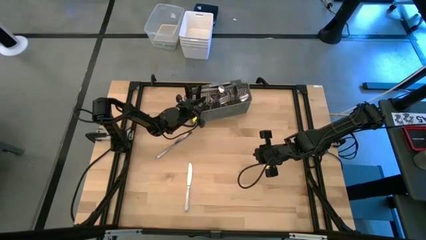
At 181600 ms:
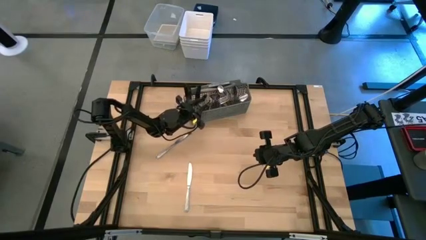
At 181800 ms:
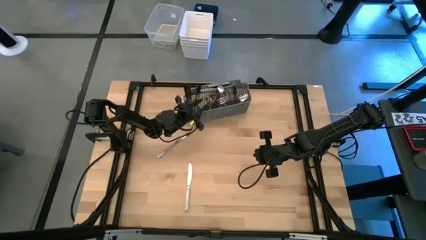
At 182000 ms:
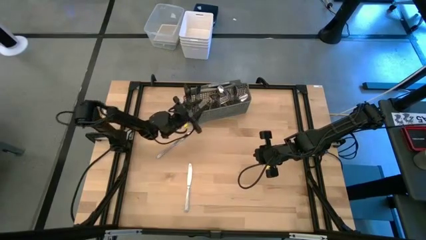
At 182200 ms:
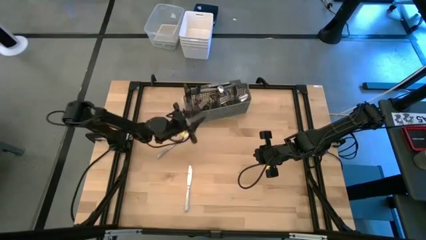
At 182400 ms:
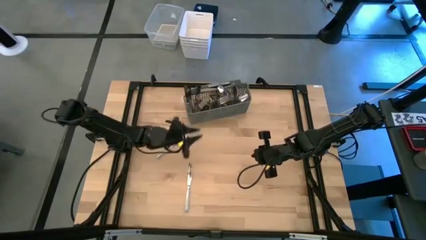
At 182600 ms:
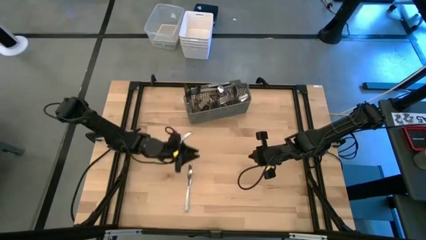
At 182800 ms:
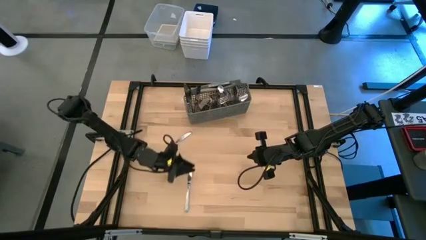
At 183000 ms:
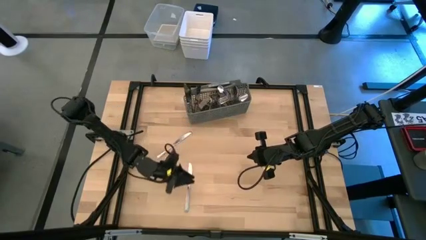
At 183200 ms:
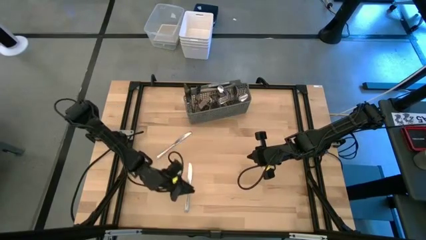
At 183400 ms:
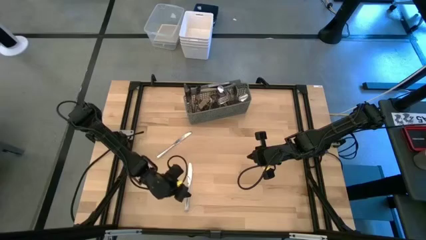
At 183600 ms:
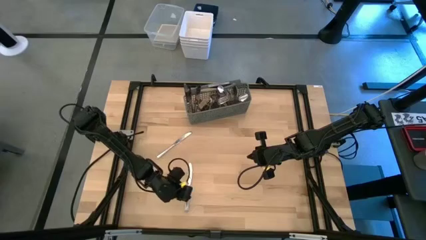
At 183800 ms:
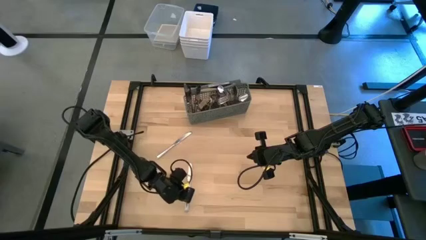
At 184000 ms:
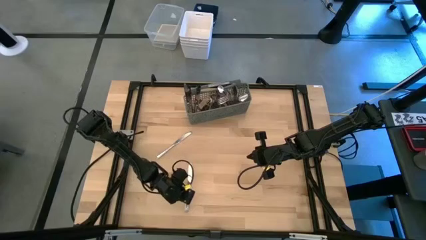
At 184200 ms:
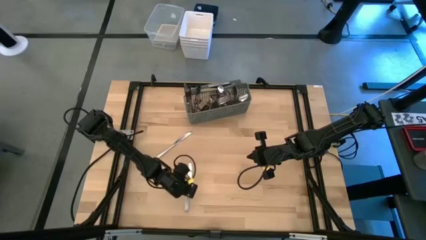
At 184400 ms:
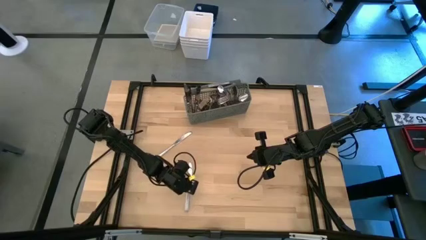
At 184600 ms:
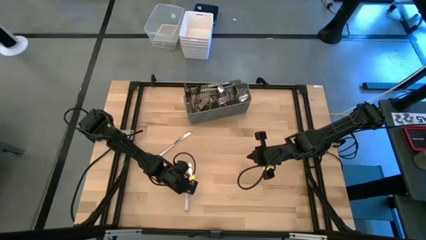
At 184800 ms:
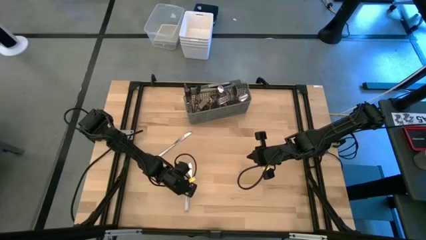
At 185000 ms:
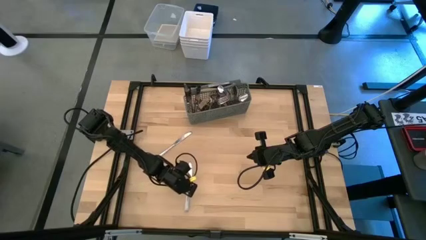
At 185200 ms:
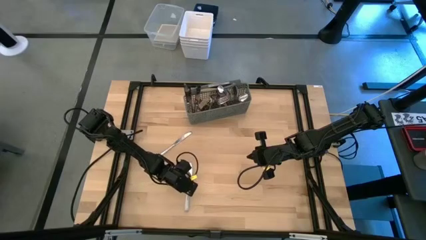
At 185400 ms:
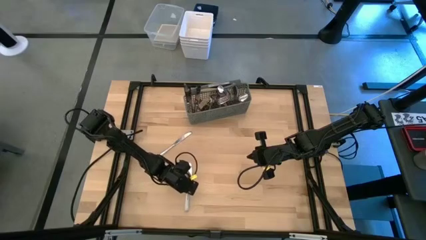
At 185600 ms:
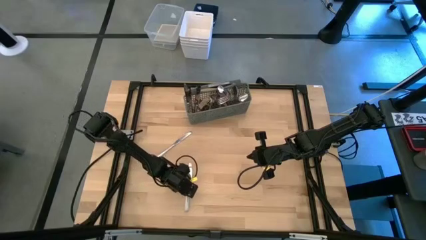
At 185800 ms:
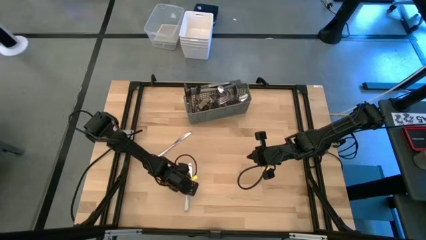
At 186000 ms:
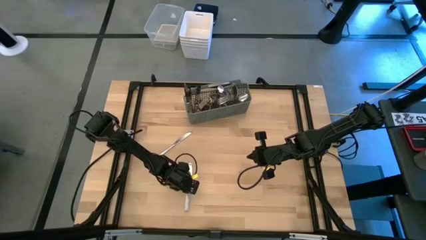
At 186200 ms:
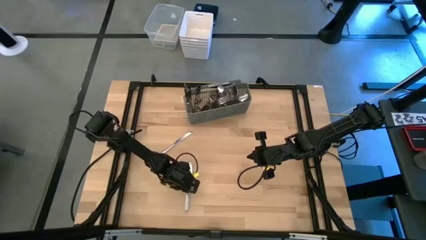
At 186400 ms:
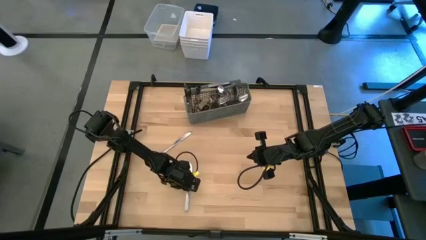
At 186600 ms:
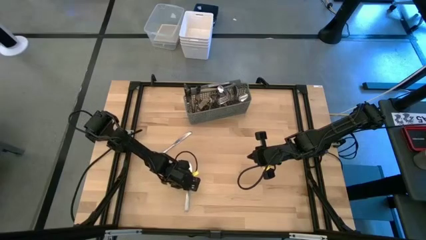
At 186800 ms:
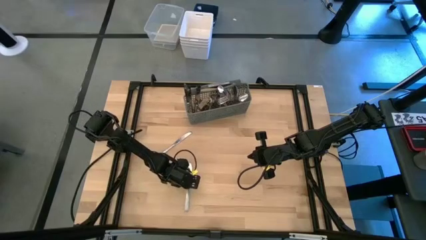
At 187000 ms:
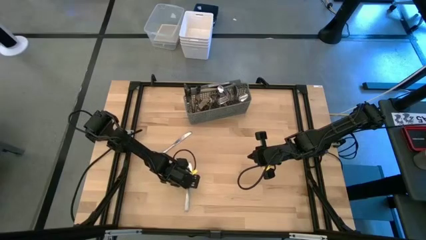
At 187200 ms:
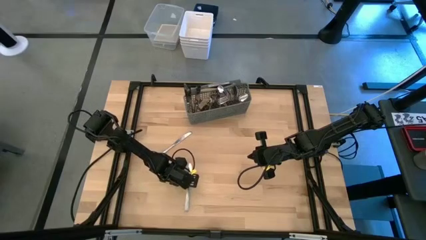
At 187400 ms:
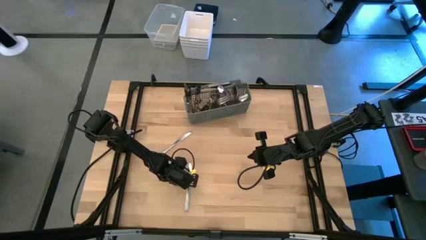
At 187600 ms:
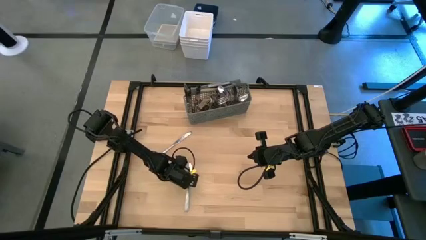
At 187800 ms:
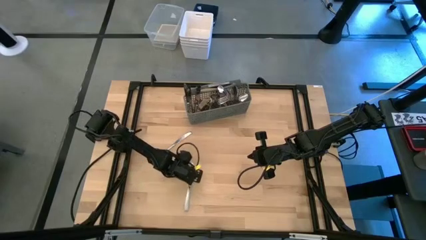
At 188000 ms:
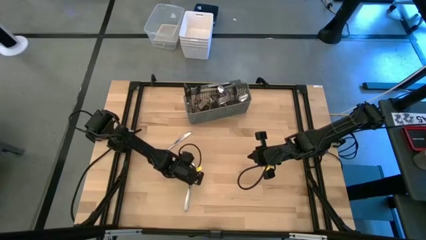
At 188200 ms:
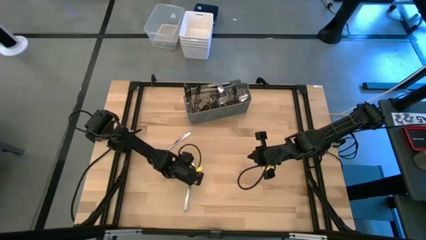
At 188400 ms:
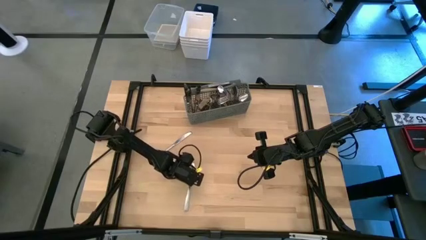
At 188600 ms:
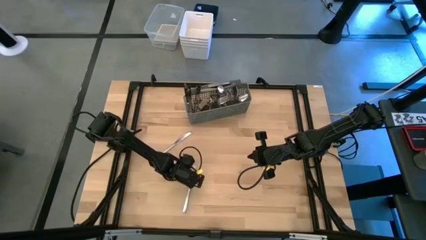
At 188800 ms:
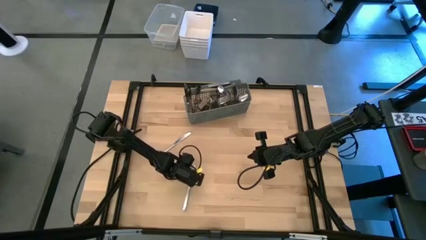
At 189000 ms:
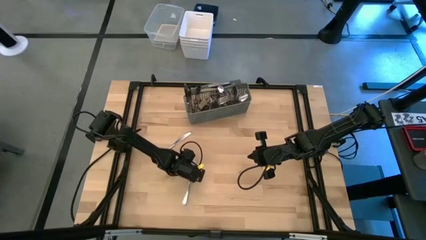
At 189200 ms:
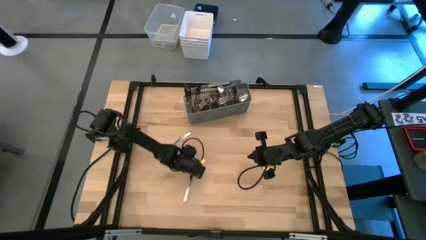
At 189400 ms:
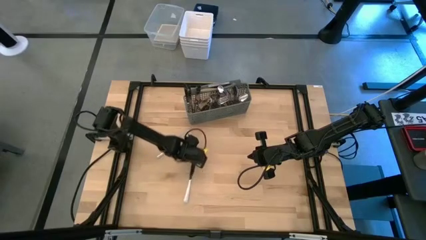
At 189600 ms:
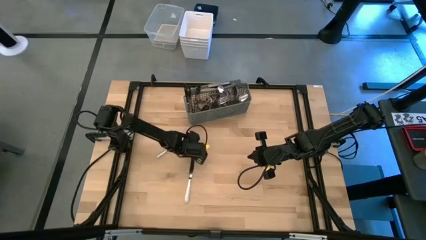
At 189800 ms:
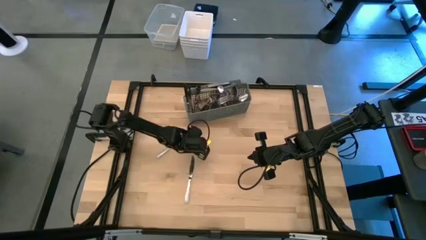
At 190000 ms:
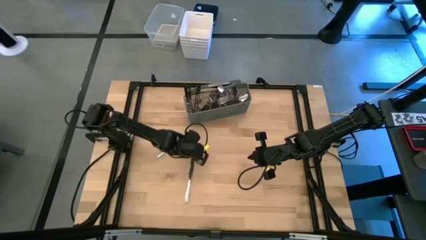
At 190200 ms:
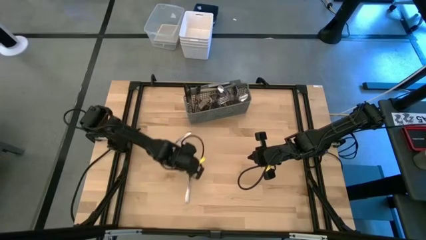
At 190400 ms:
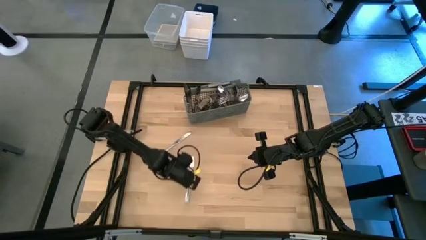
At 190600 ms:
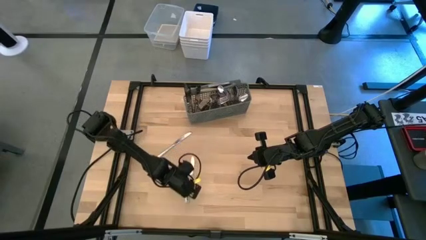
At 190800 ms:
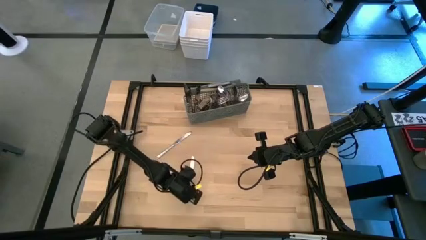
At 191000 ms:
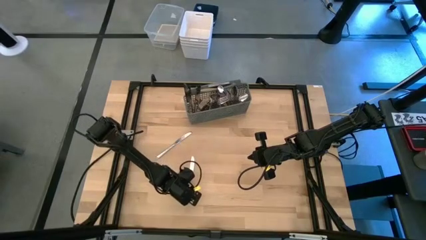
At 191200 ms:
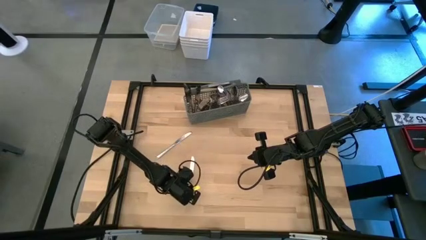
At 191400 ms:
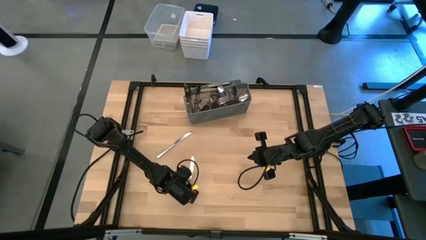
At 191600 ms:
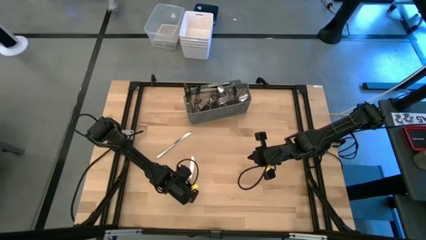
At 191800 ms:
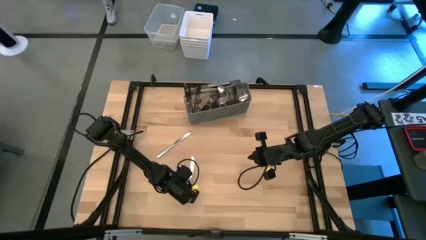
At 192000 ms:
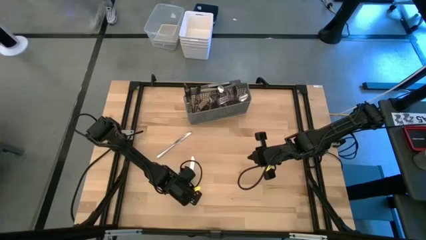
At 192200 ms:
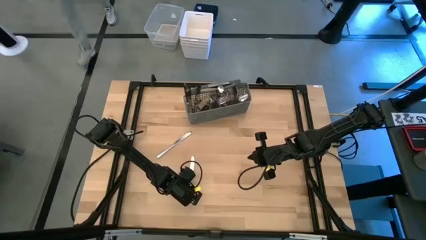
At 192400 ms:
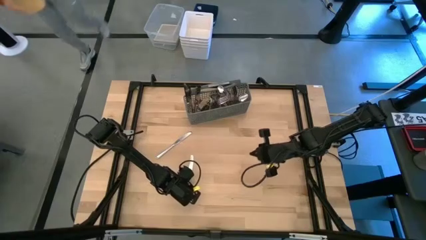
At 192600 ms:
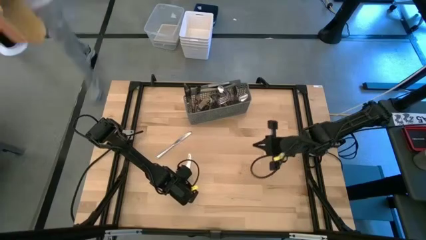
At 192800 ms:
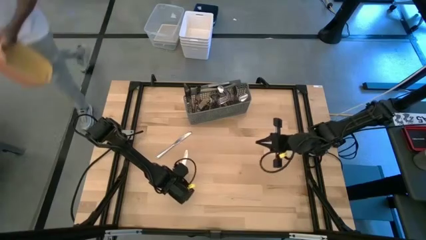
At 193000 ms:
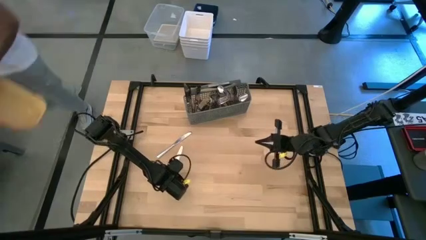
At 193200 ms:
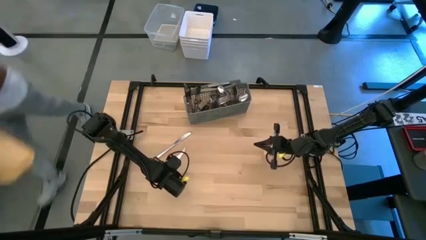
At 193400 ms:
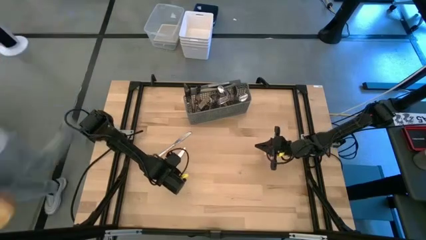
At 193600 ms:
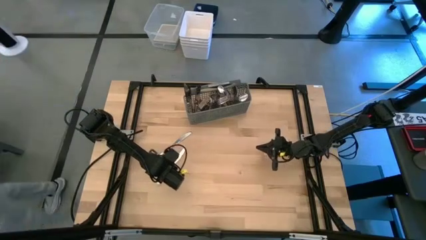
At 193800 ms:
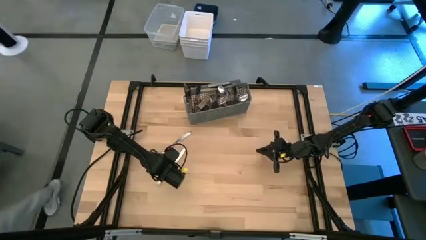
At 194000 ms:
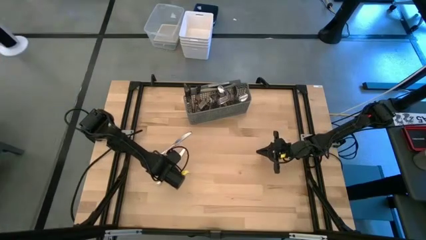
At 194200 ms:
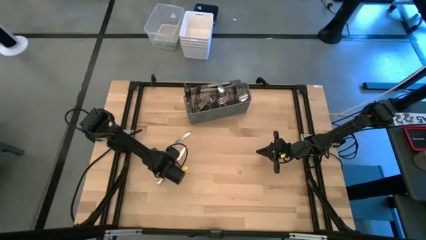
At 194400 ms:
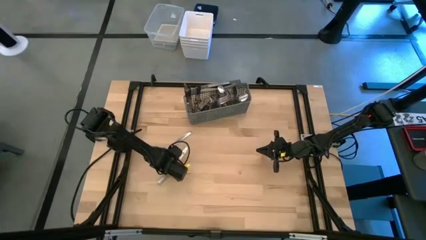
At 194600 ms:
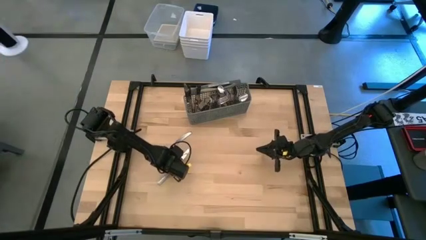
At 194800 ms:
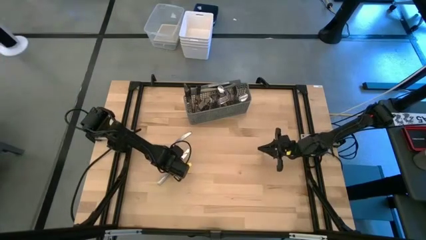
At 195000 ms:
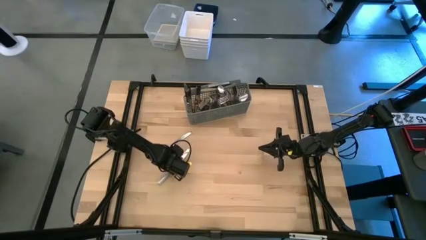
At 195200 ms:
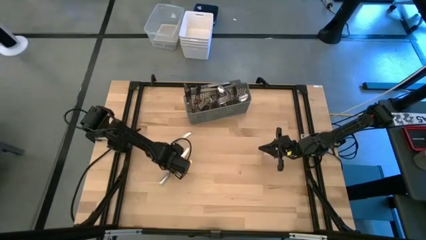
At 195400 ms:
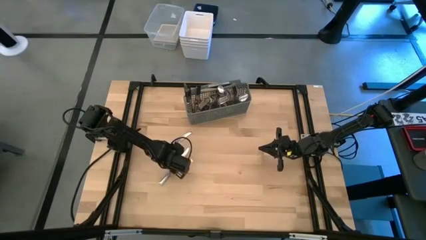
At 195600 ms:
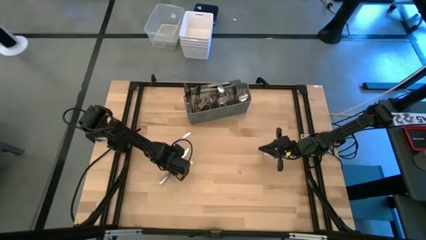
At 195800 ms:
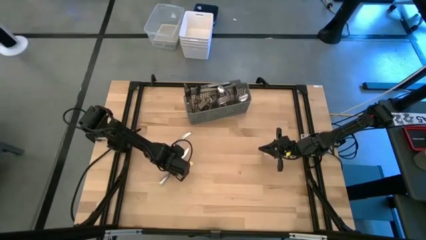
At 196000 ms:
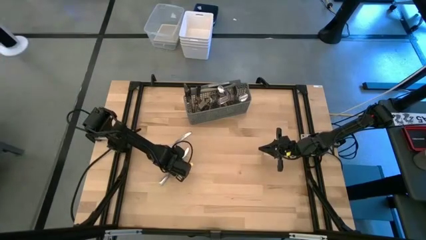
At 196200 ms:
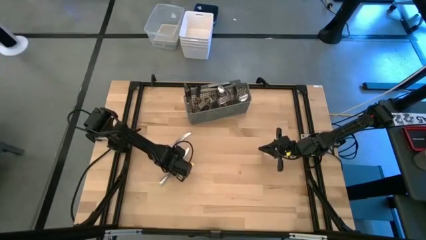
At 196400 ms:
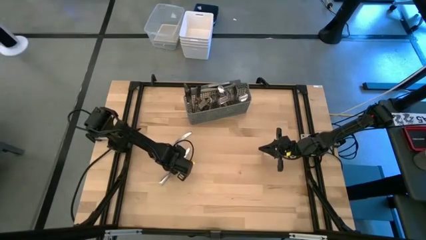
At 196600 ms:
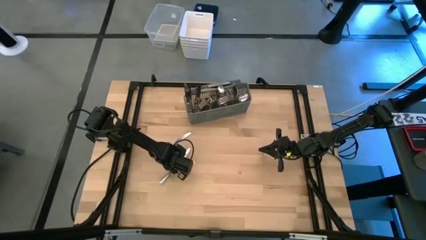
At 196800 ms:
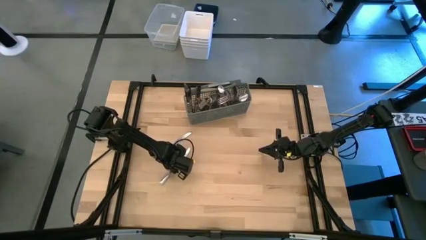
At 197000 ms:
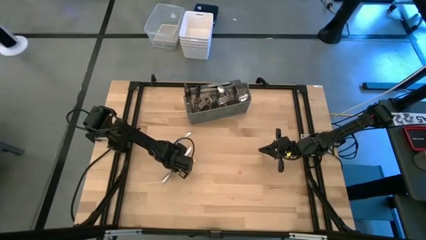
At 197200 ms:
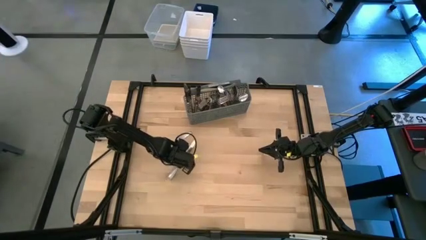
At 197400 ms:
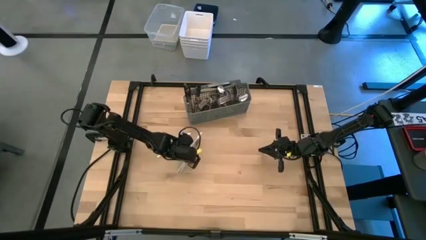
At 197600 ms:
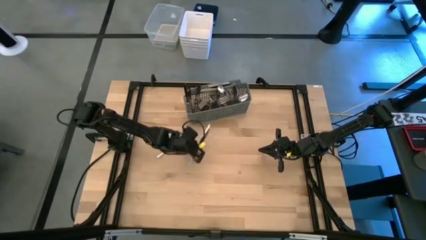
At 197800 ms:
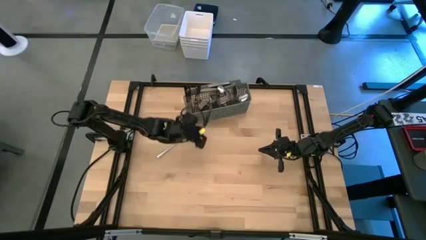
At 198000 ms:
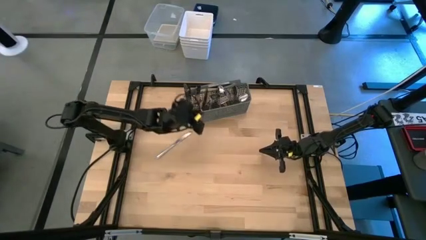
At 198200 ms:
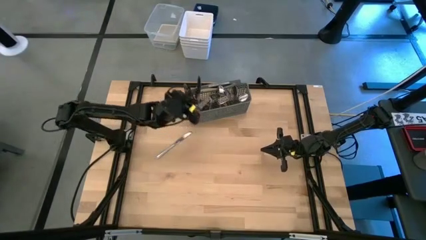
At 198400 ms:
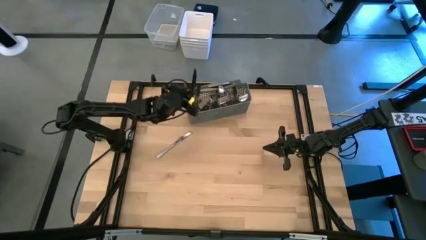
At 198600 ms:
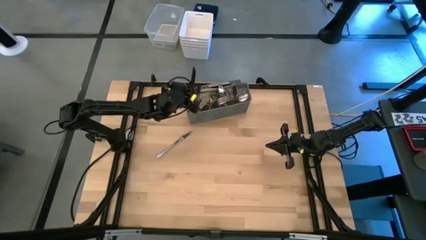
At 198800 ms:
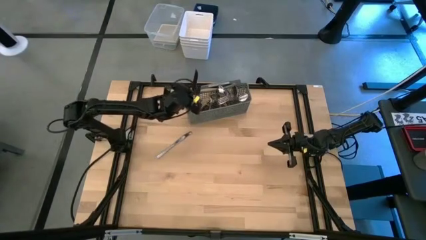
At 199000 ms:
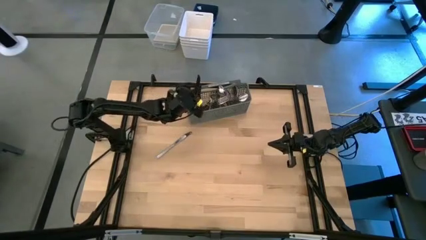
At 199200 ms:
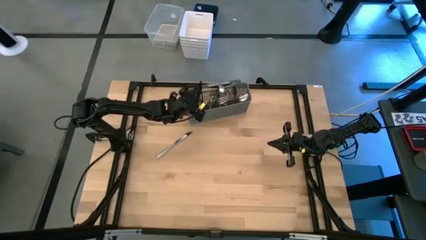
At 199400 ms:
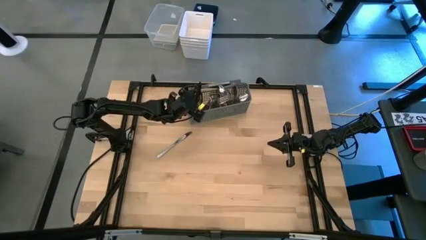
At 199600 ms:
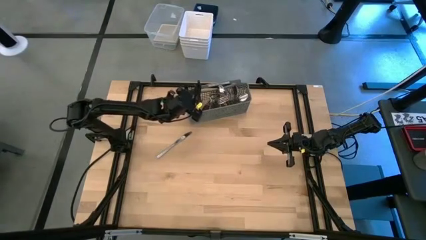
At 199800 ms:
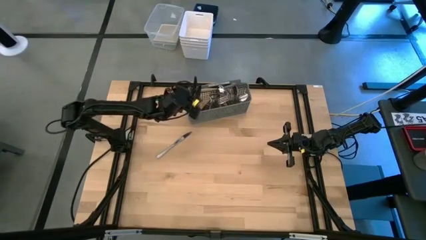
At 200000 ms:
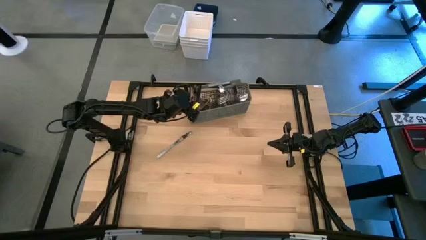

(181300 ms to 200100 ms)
Task: Sort silverware
Put the silver table knife into the gray silverware organizer
